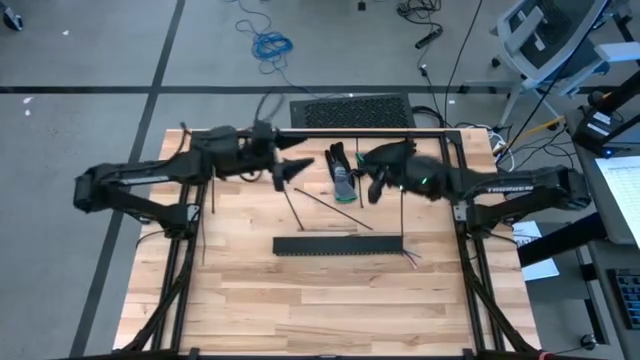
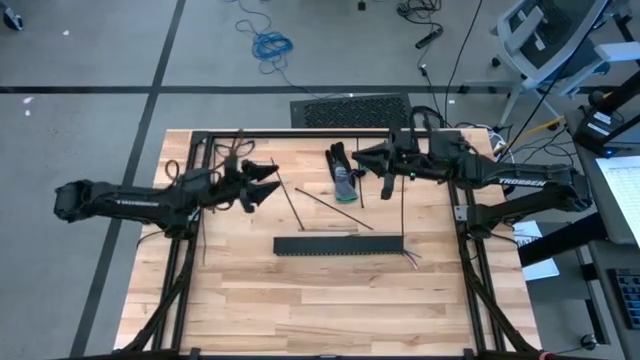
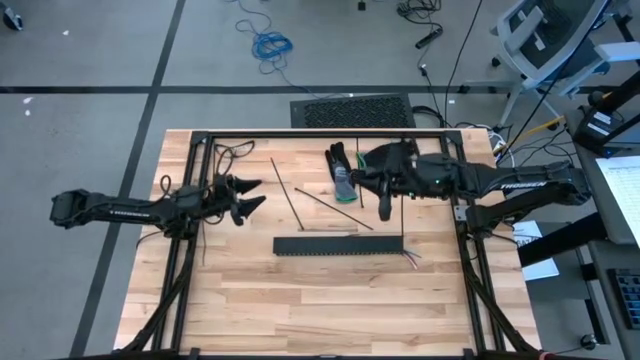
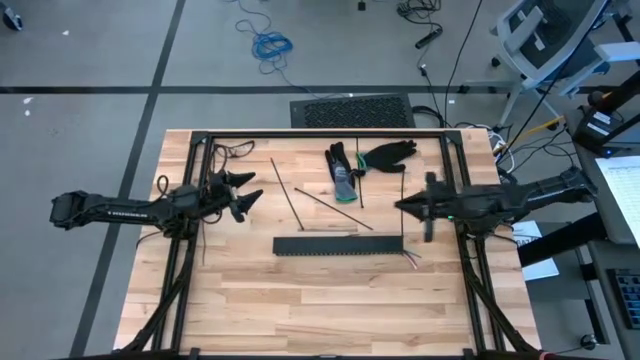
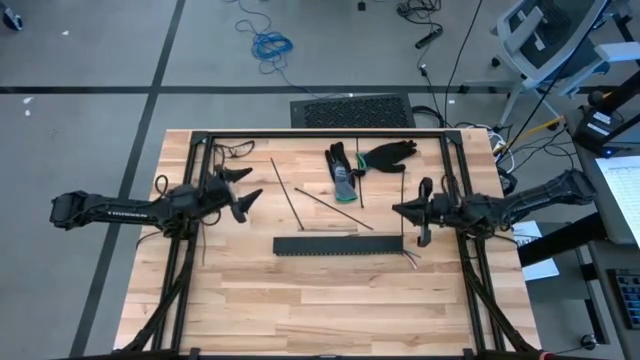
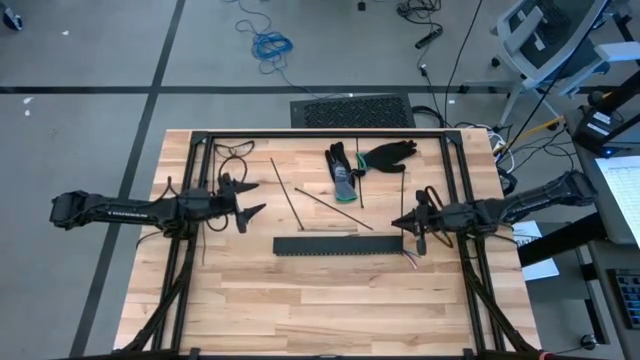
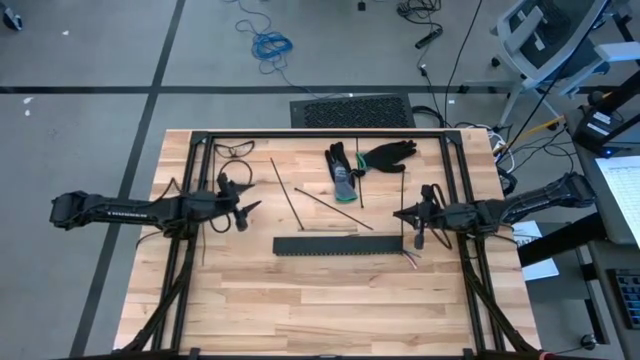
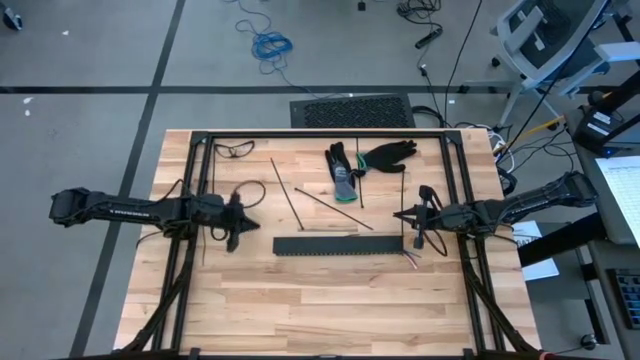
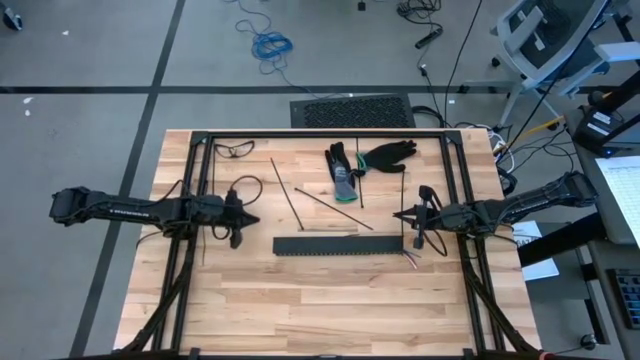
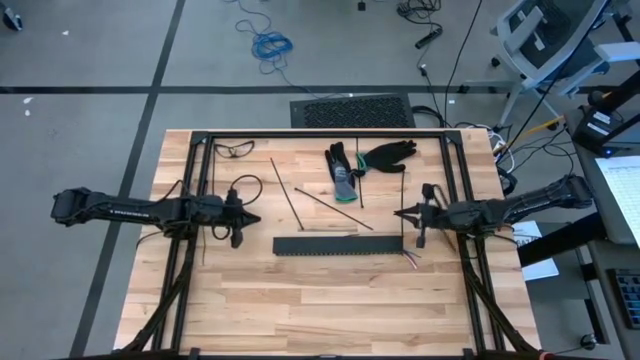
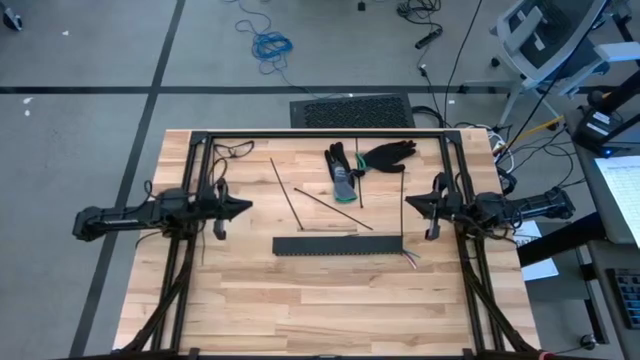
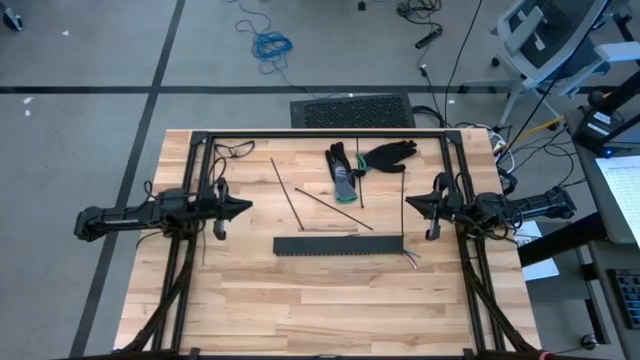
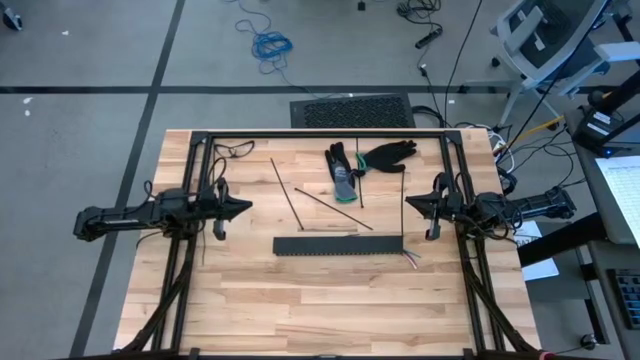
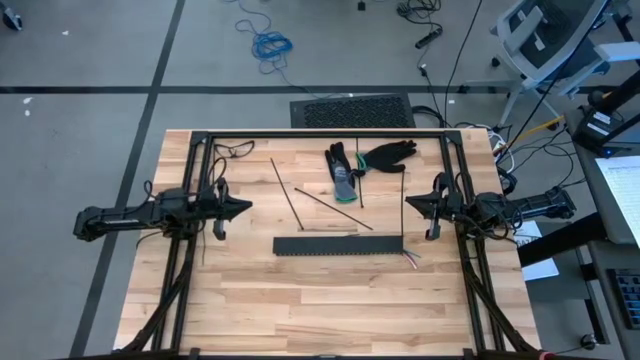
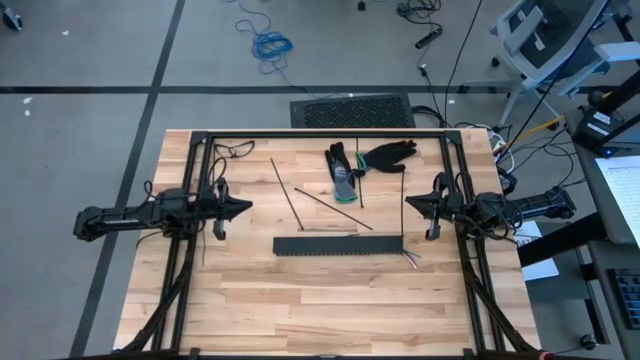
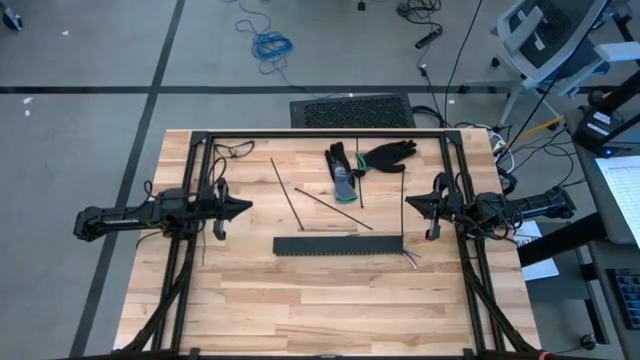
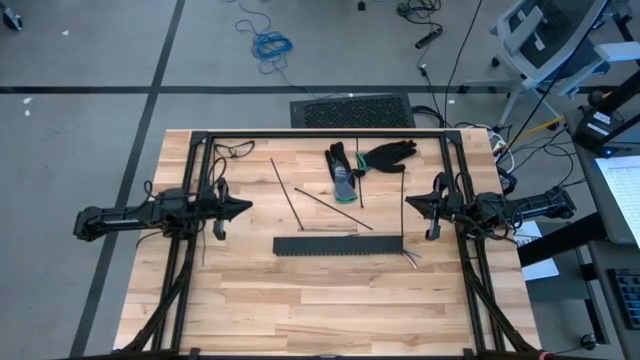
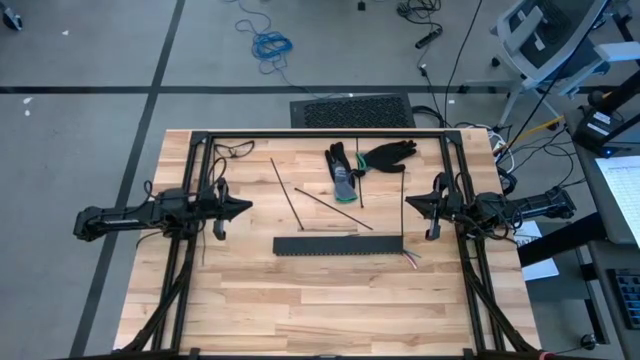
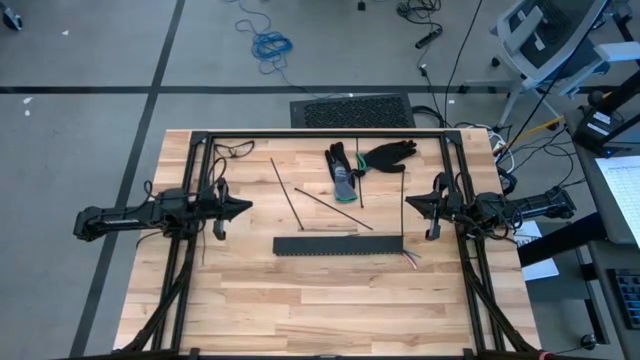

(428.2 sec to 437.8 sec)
Task: Ziptie cables
Return to Home Position

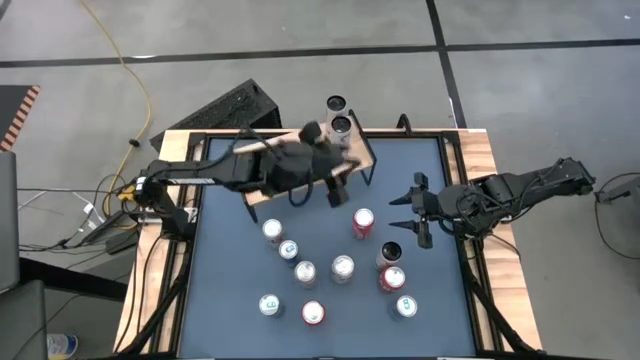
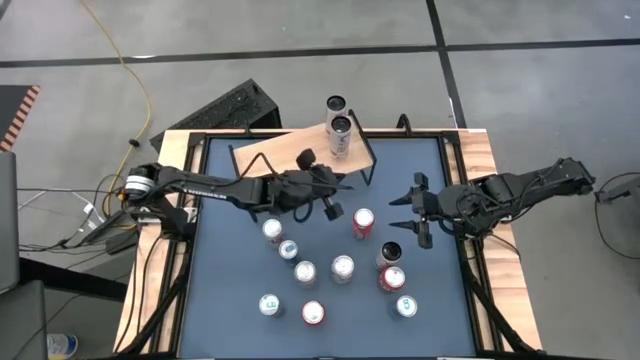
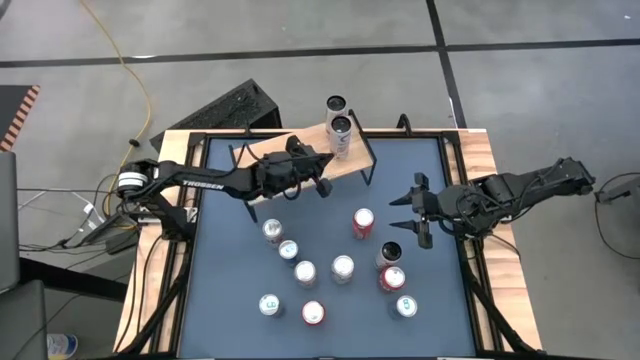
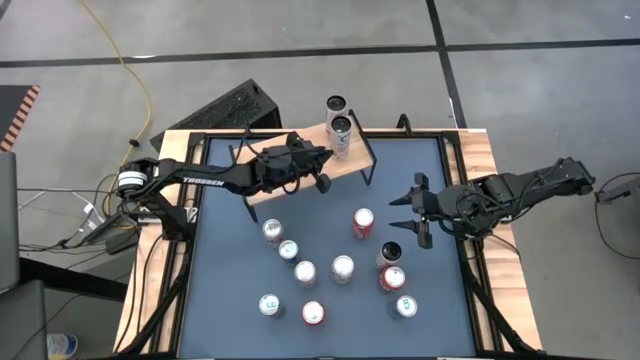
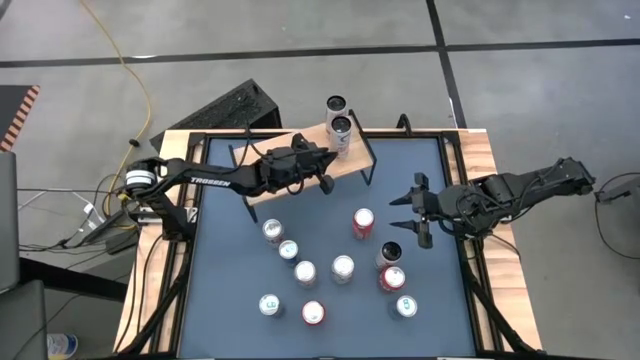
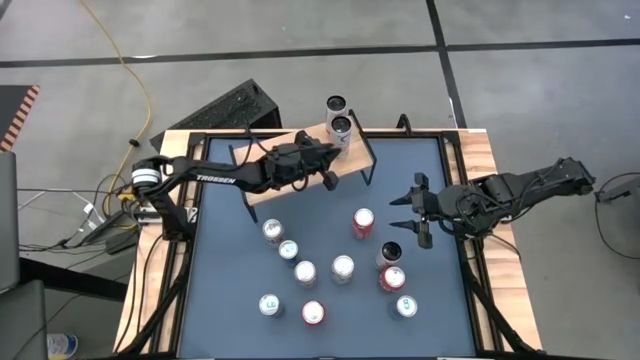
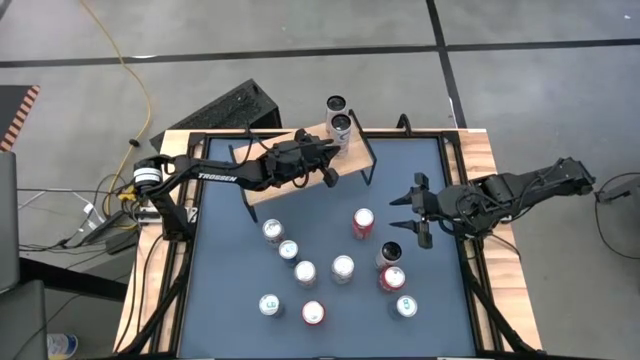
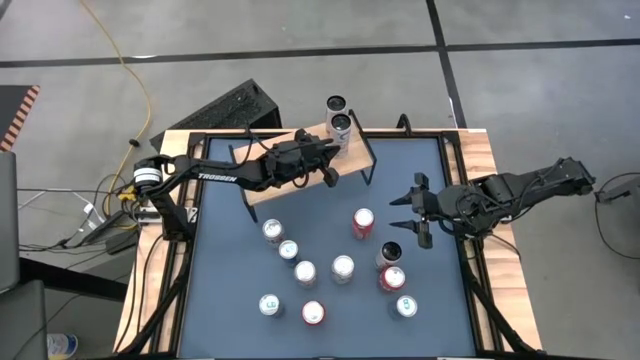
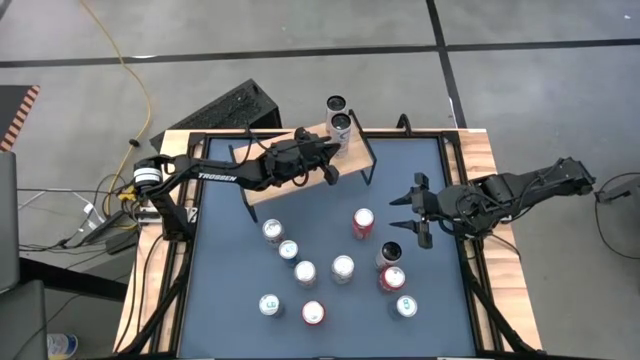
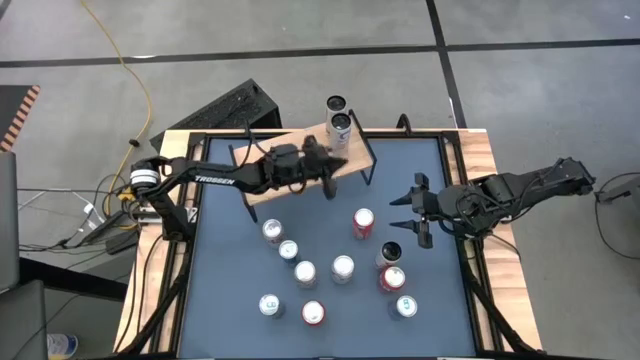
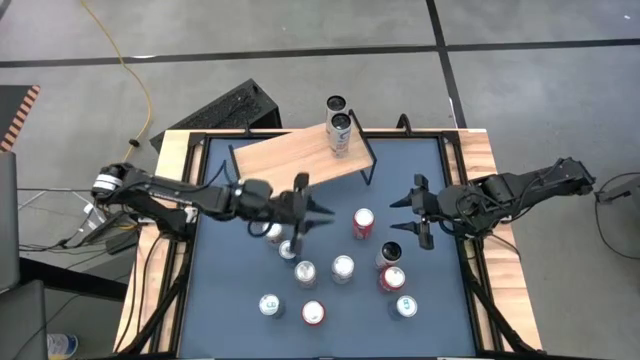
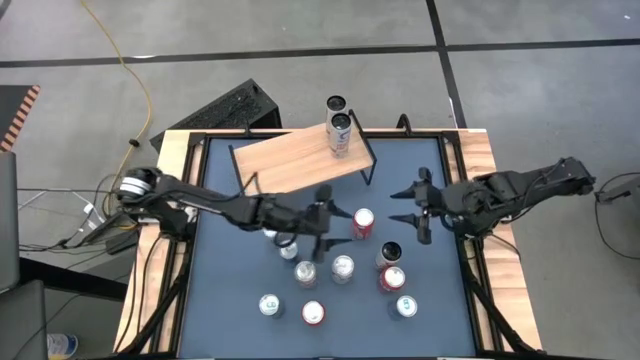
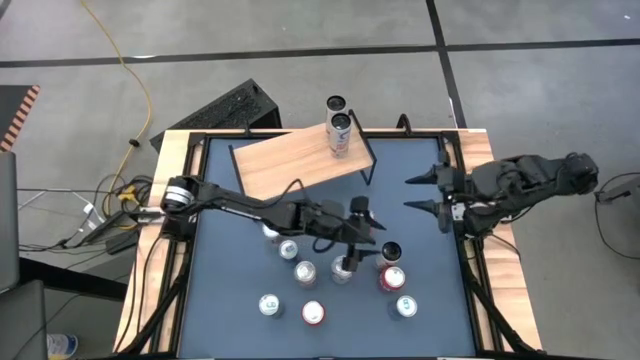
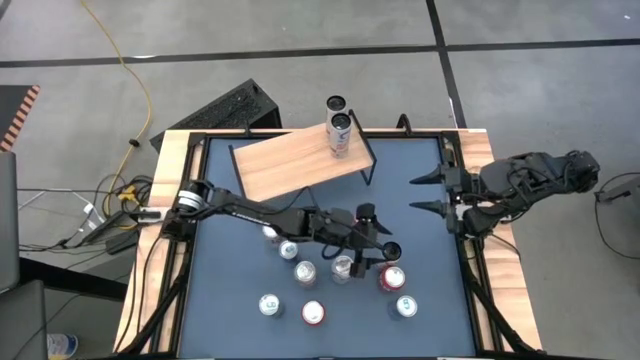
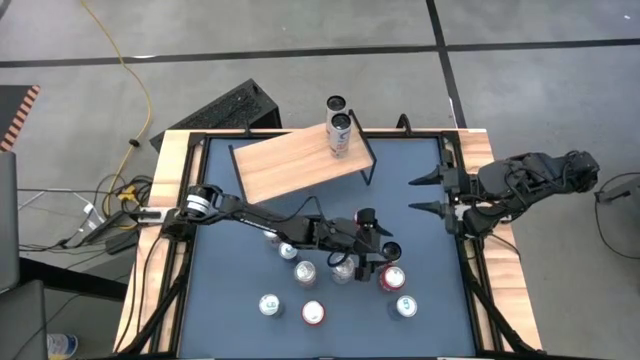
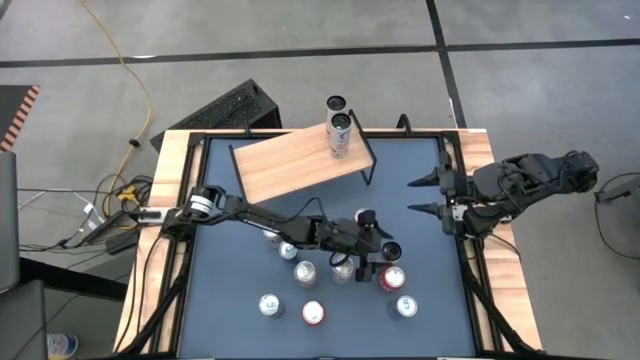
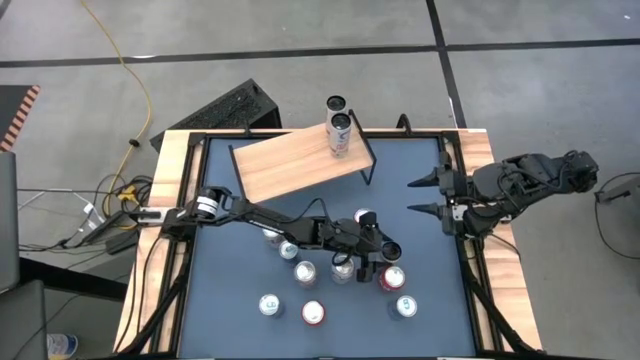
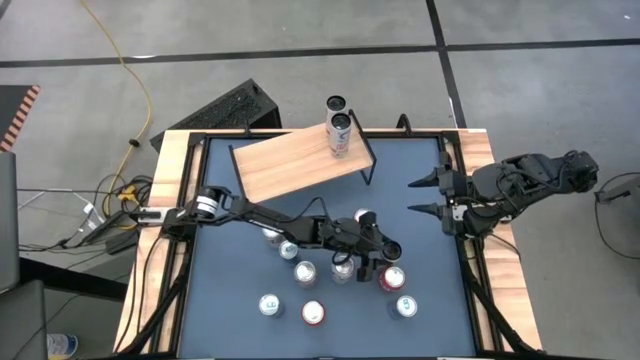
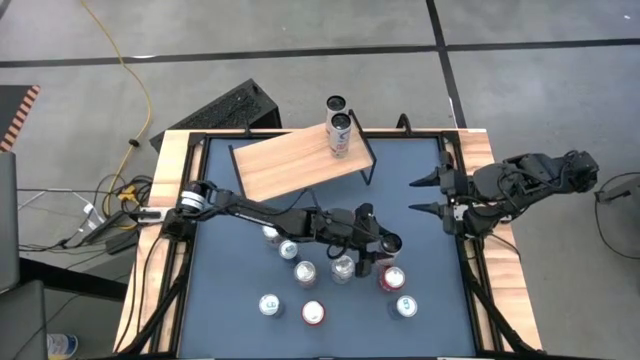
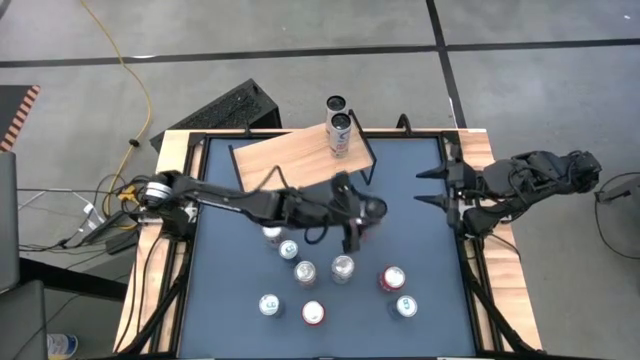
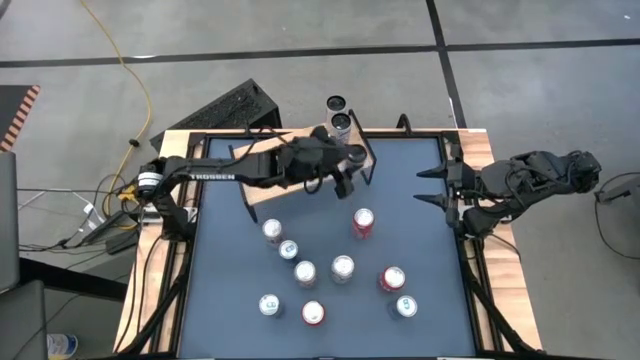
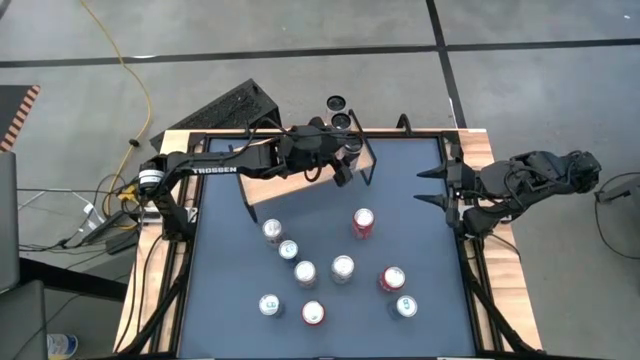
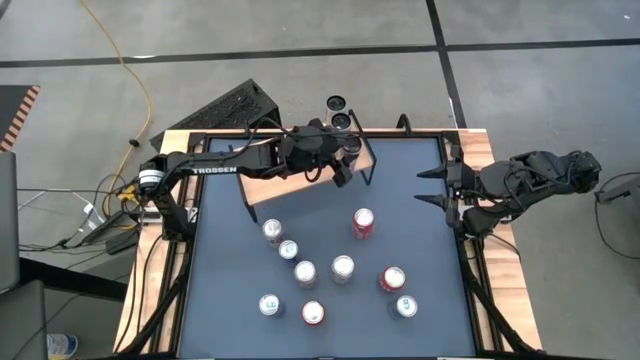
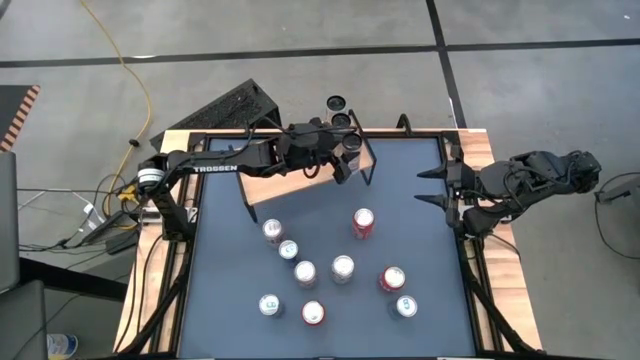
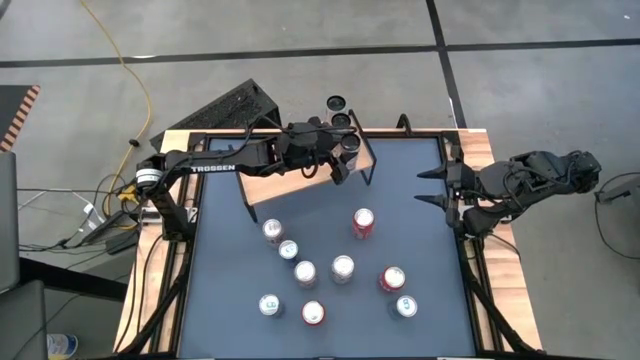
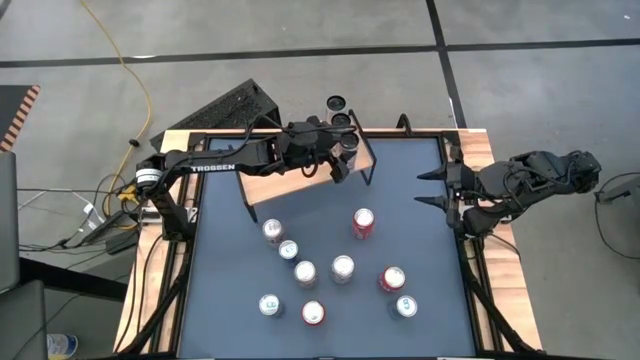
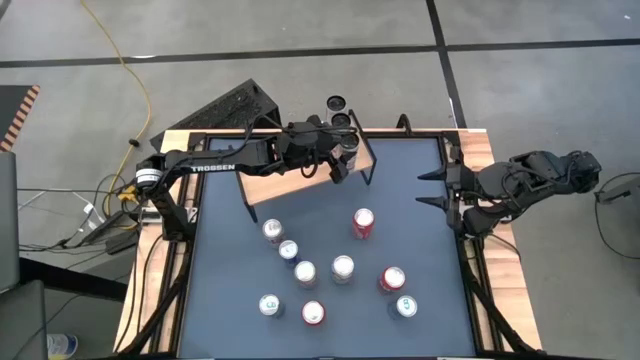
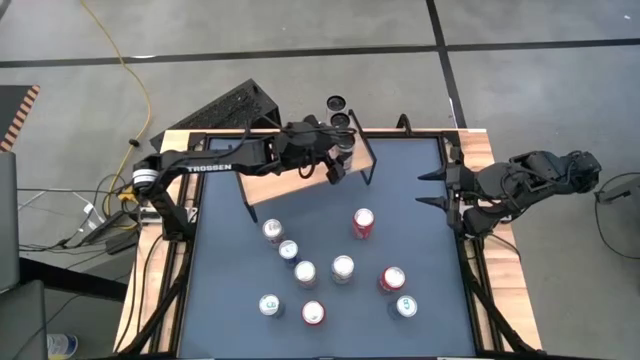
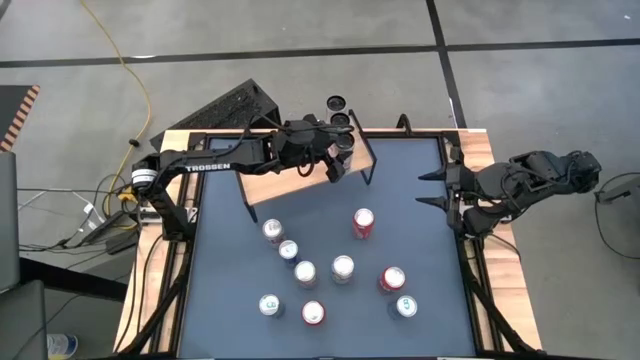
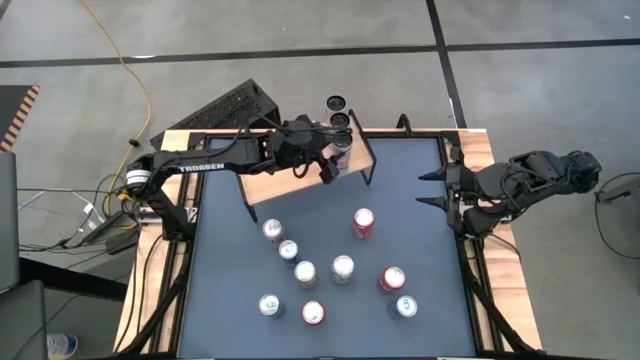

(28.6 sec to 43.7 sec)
Task: Place canned beverage on shelf
Put the white pink soda can on the shelf aligned with the other white pink soda cans
